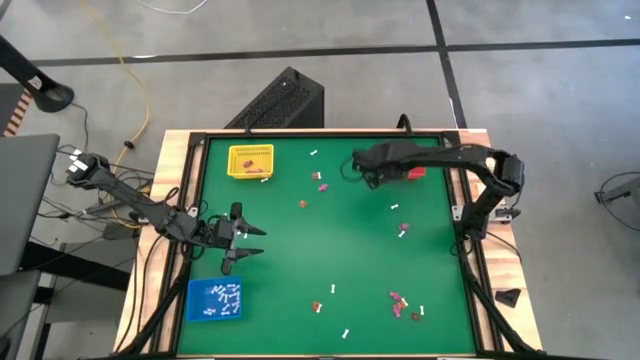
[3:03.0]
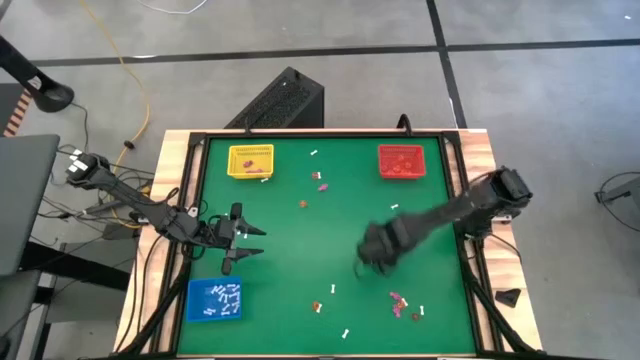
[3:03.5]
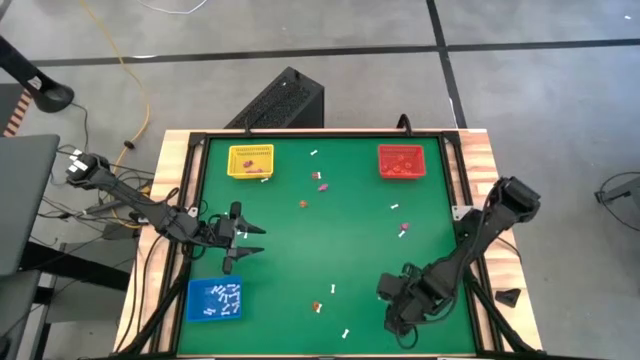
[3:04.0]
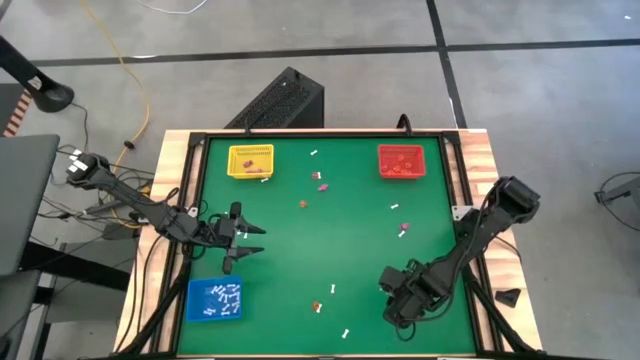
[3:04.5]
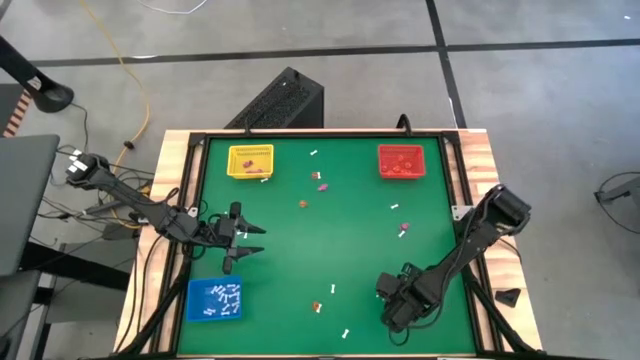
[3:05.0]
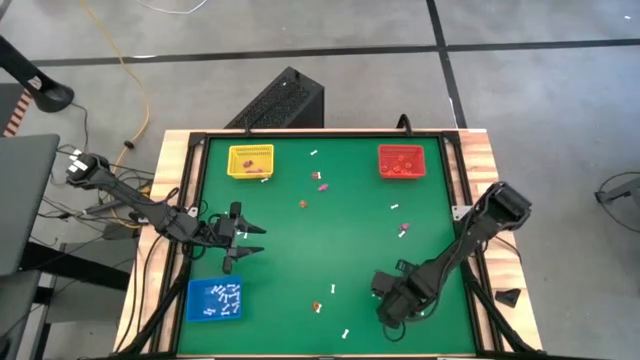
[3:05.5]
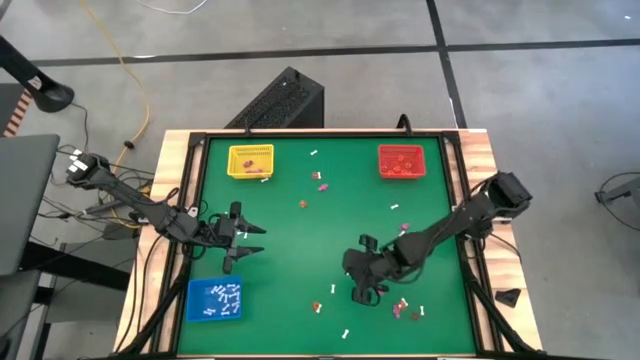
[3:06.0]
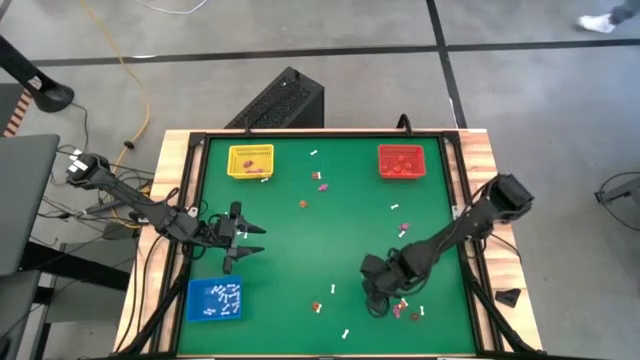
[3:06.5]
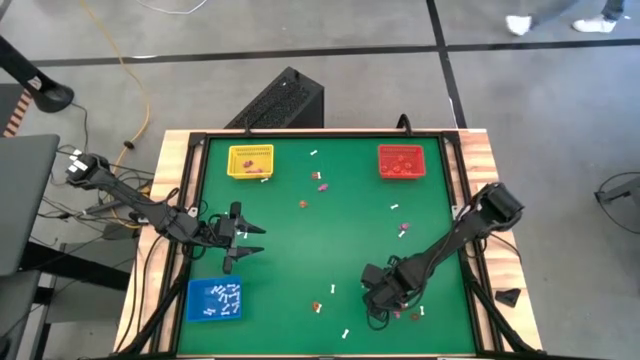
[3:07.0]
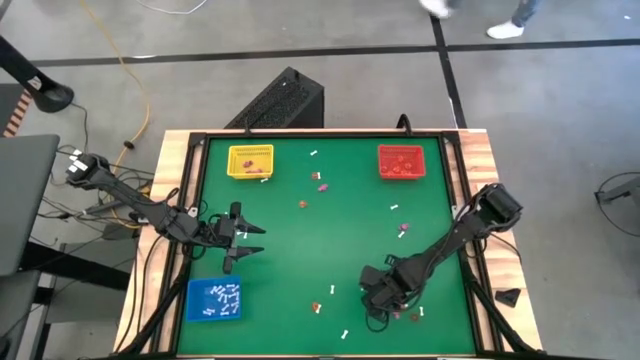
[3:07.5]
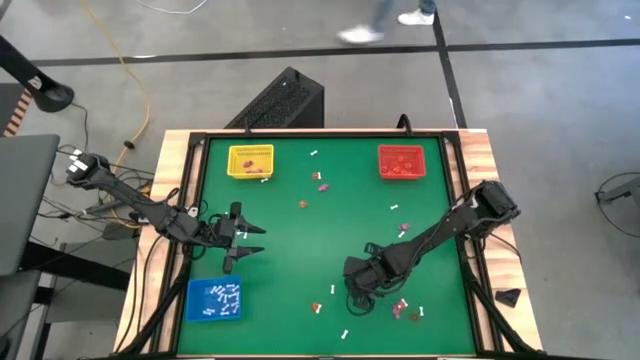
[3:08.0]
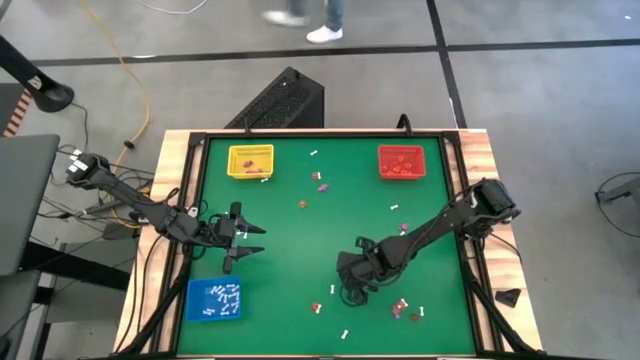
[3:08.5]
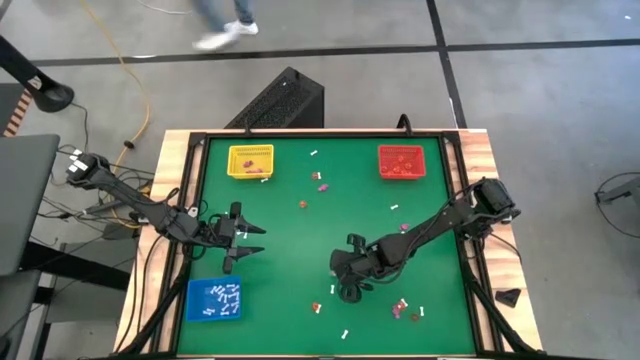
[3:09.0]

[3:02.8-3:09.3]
Task: Sort Halloween decoration
Put the pink skeleton toy into the yellow bin

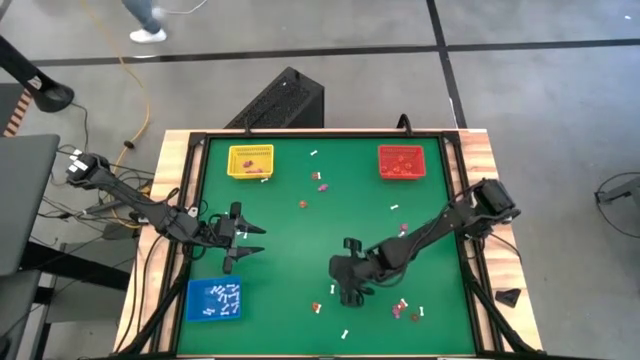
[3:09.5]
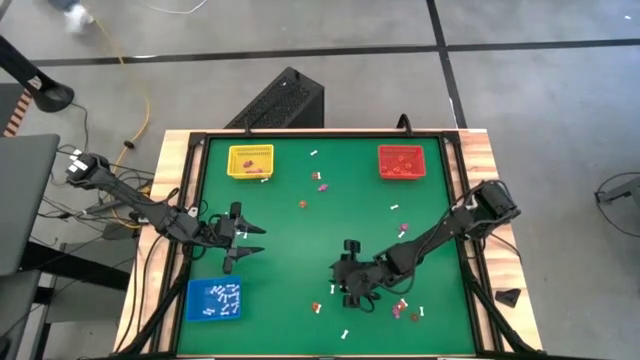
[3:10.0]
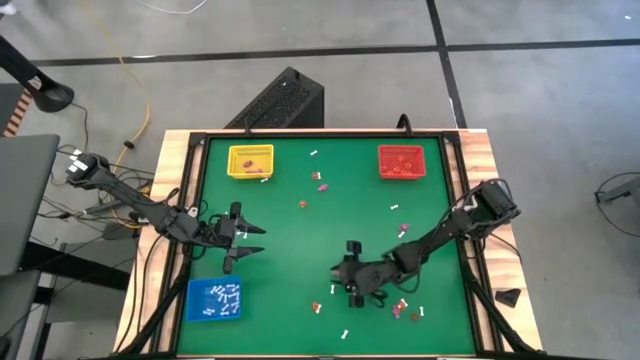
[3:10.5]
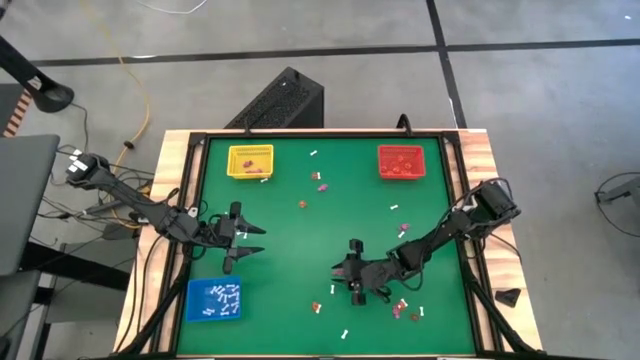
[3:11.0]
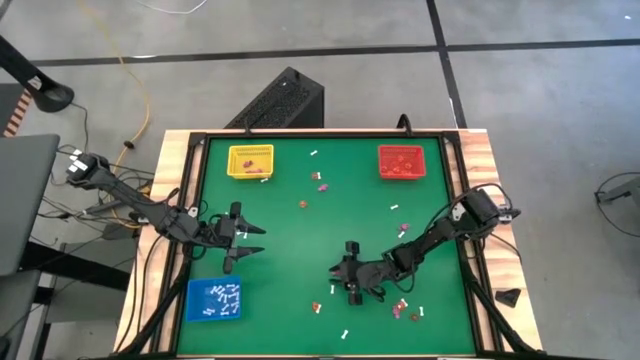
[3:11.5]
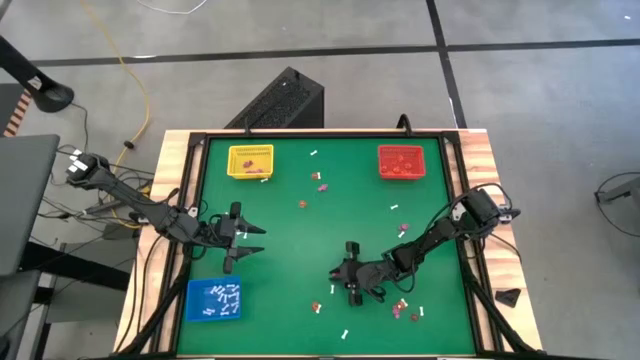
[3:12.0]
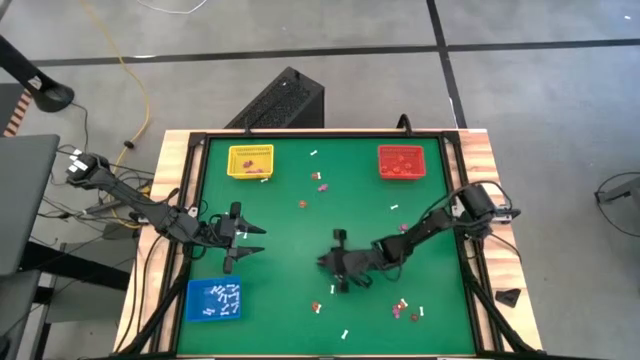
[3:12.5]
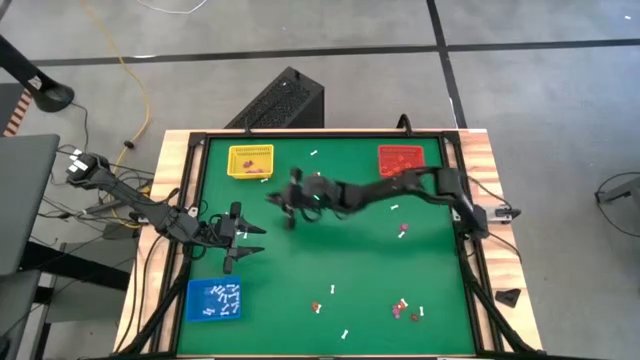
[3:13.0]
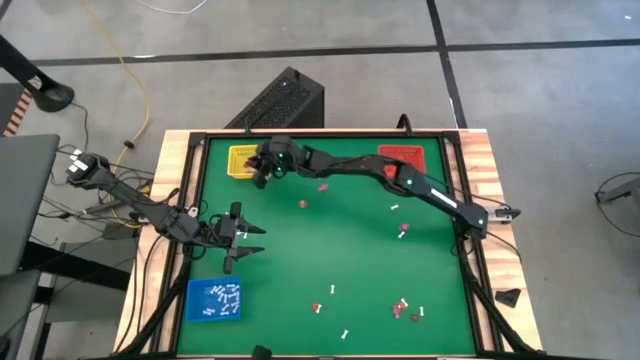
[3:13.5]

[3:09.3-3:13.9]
Put the pink skeleton toy into the yellow bin

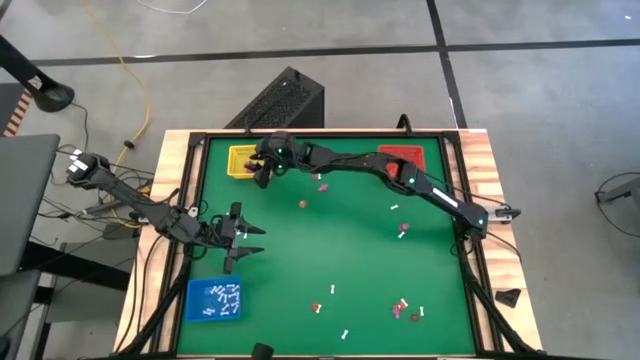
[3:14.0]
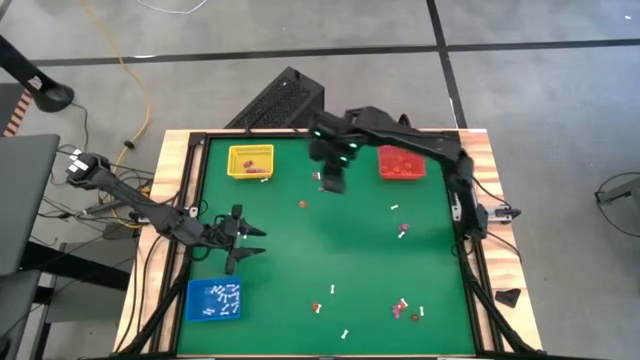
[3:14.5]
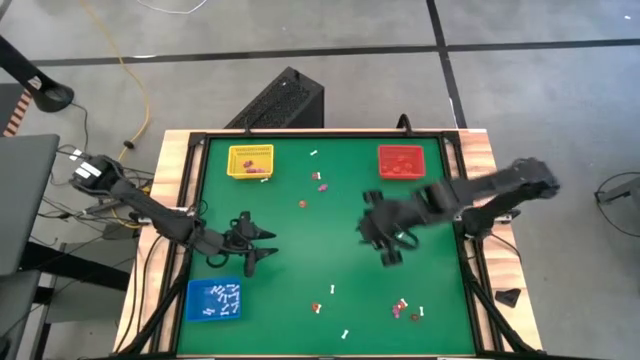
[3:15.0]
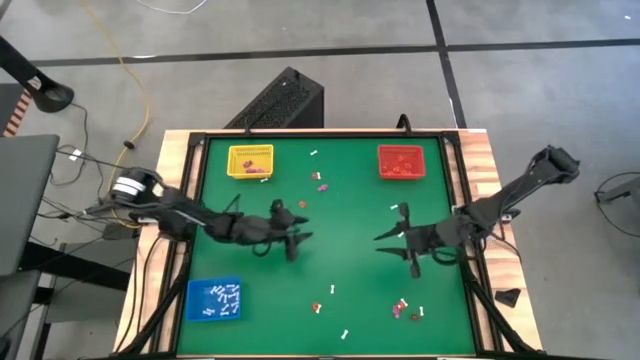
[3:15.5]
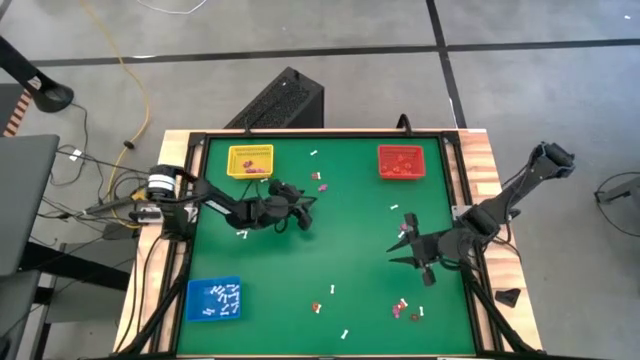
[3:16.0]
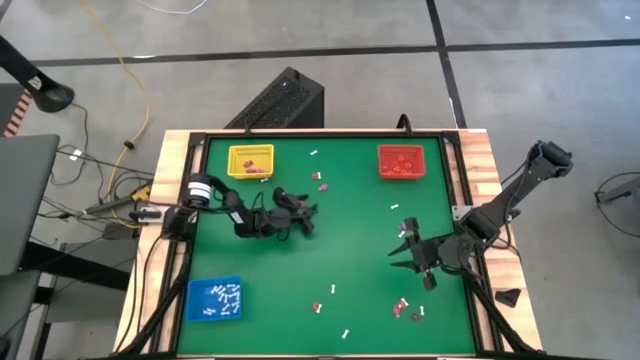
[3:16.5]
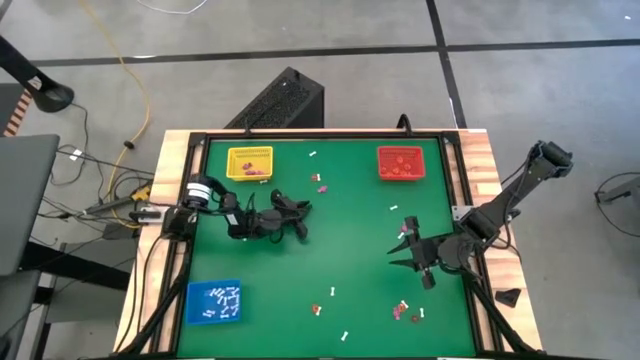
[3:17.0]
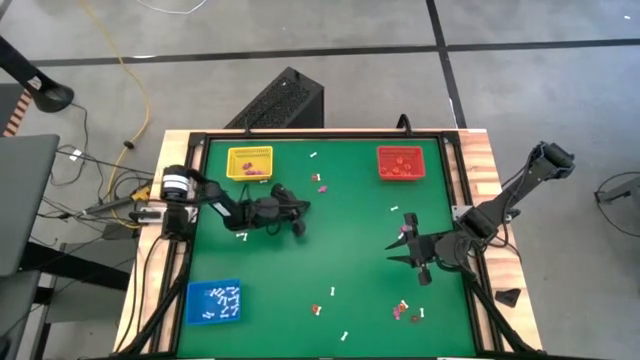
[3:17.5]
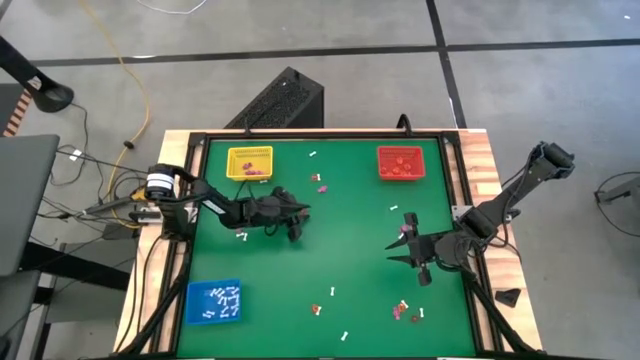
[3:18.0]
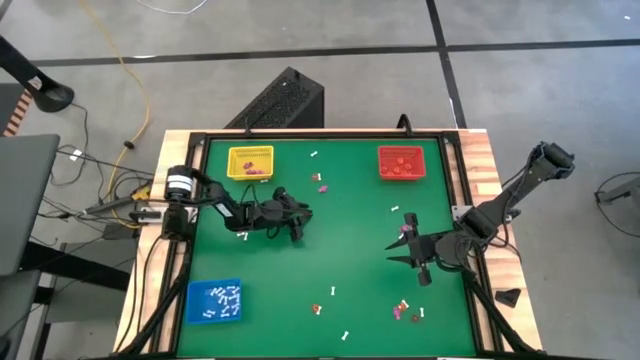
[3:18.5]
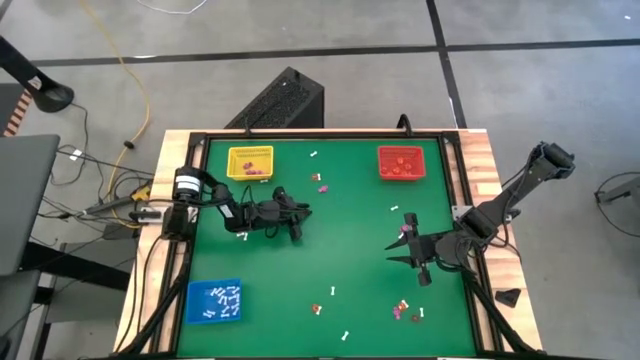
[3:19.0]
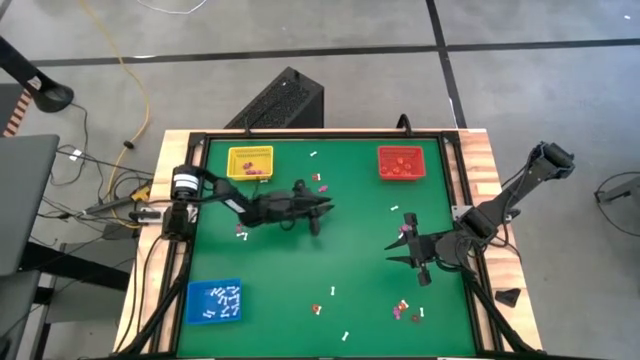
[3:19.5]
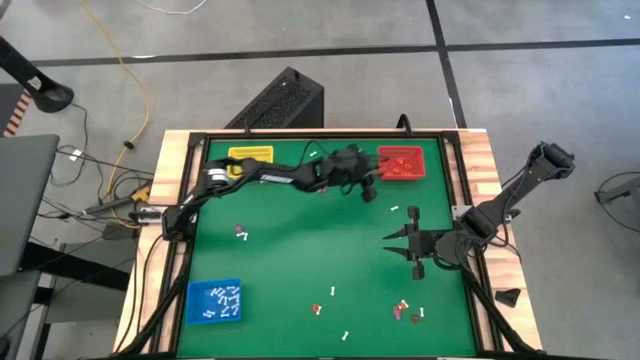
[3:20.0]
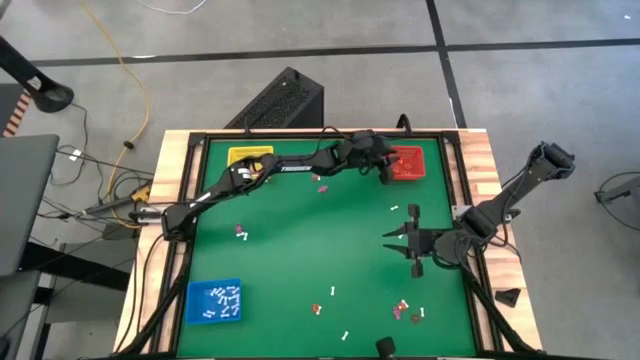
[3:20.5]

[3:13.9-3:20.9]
Put the pumpkin toy into the orange bin

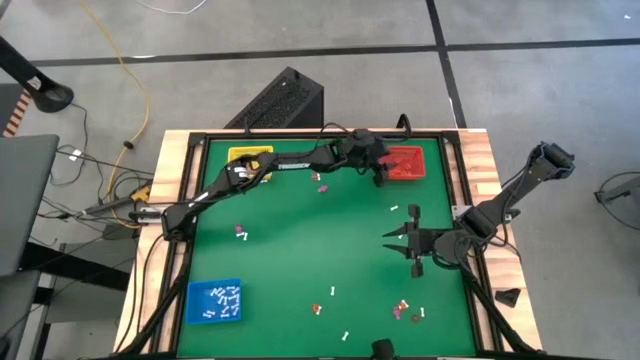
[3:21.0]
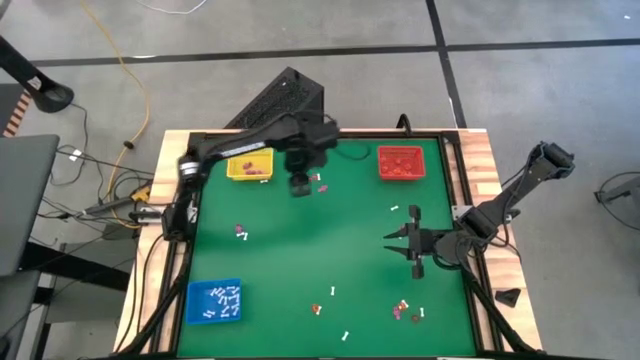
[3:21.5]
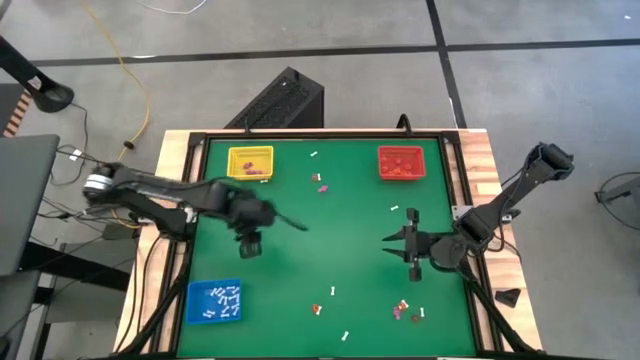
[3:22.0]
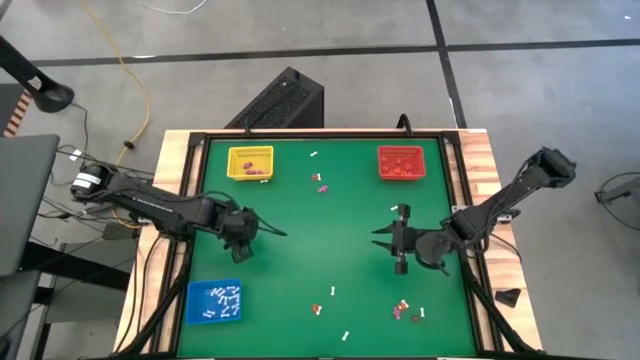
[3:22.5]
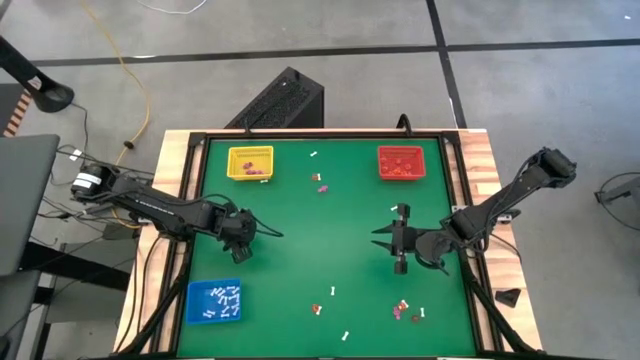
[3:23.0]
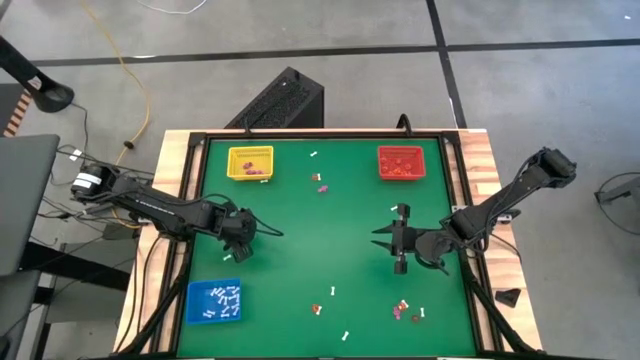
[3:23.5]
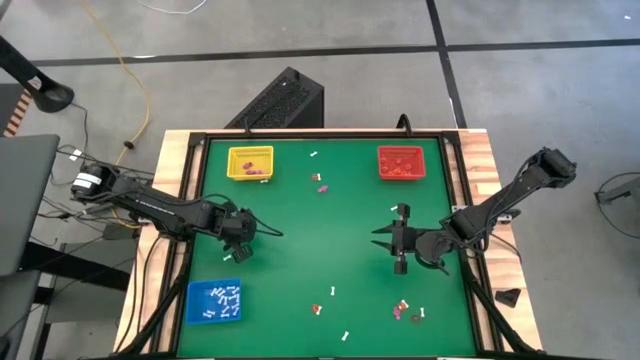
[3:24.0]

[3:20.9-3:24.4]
Put the white bone toy into the blue bin
